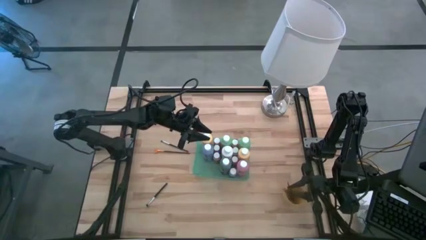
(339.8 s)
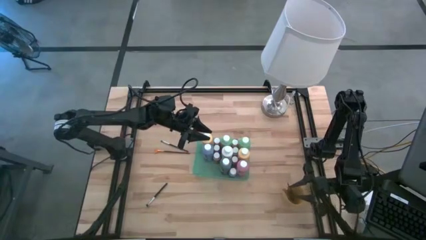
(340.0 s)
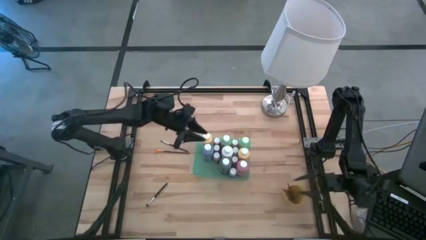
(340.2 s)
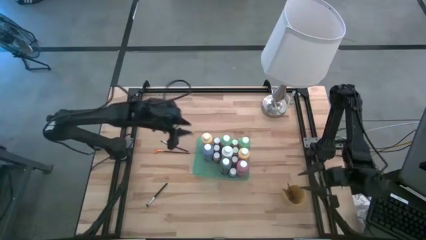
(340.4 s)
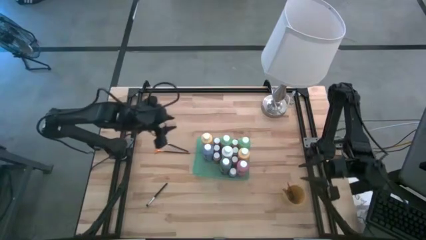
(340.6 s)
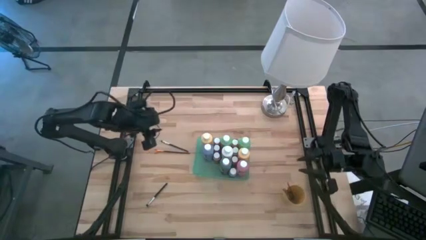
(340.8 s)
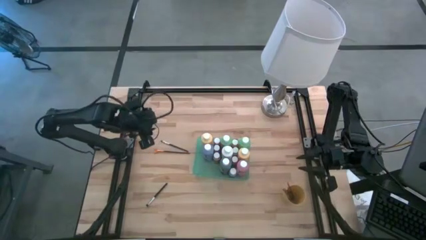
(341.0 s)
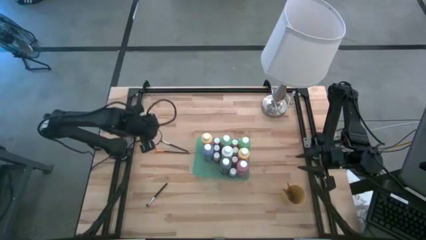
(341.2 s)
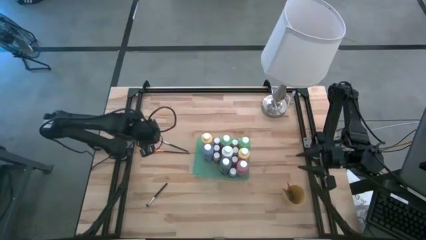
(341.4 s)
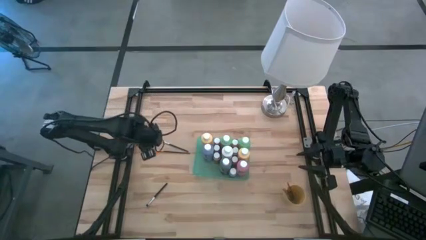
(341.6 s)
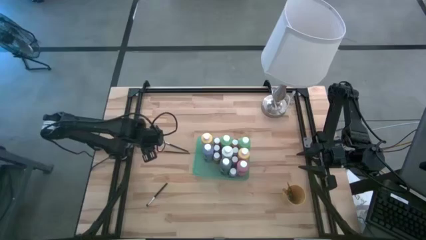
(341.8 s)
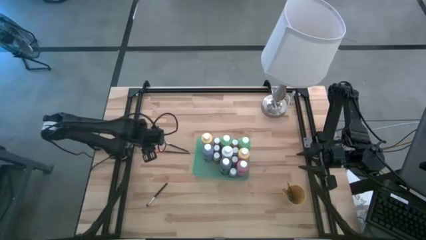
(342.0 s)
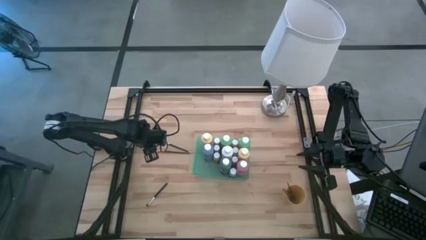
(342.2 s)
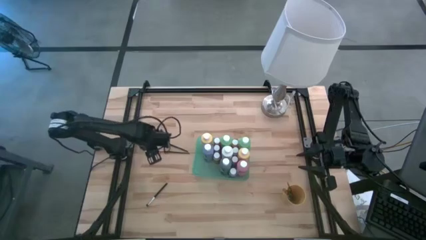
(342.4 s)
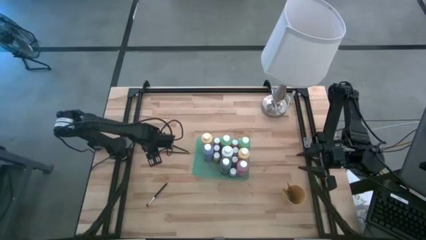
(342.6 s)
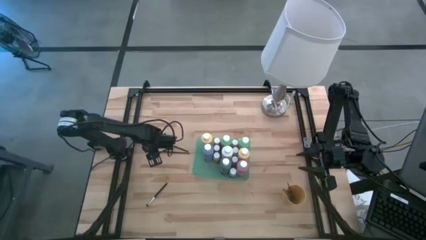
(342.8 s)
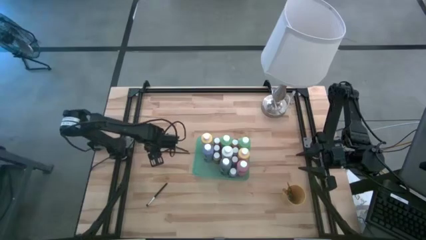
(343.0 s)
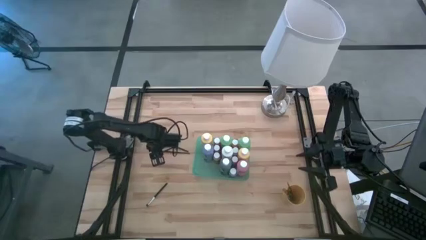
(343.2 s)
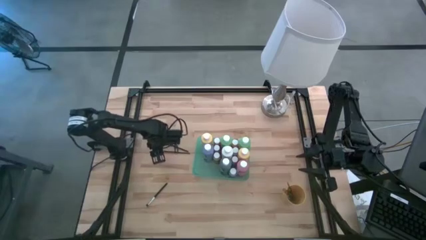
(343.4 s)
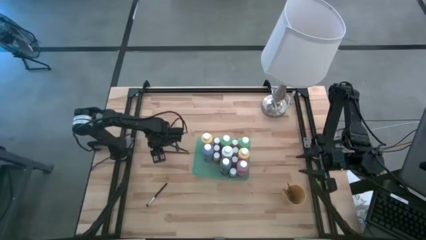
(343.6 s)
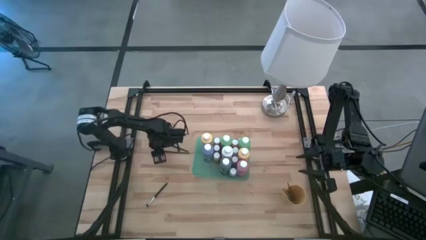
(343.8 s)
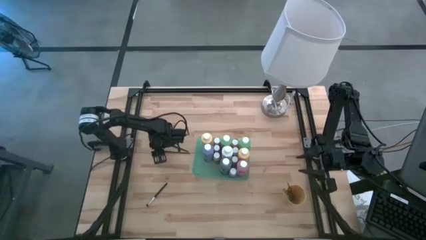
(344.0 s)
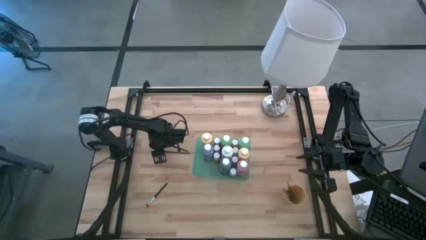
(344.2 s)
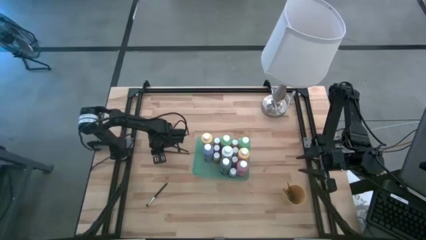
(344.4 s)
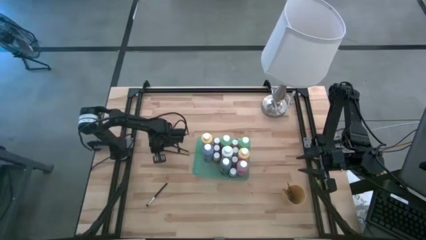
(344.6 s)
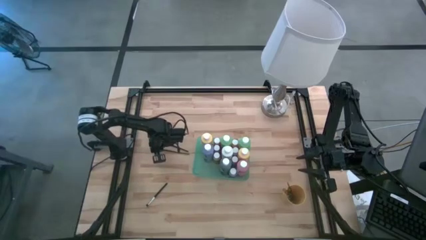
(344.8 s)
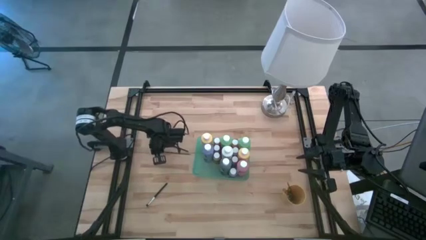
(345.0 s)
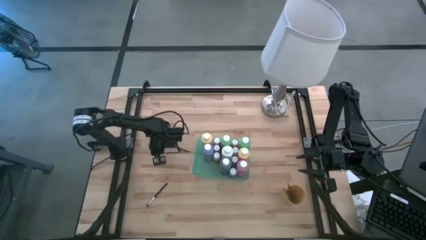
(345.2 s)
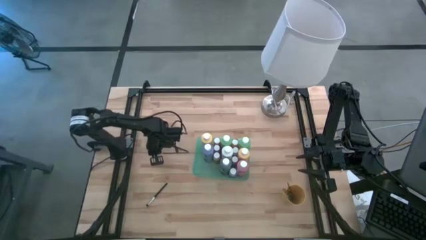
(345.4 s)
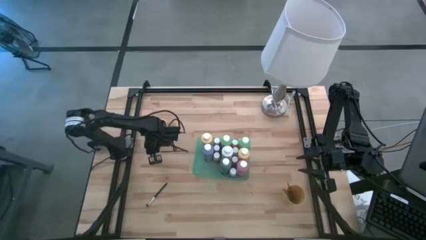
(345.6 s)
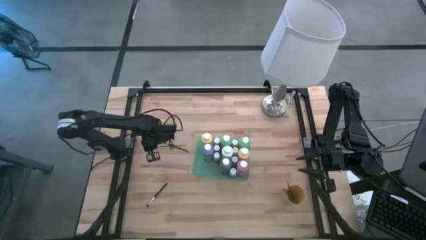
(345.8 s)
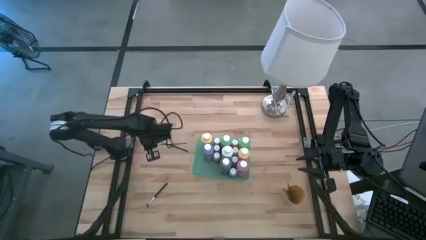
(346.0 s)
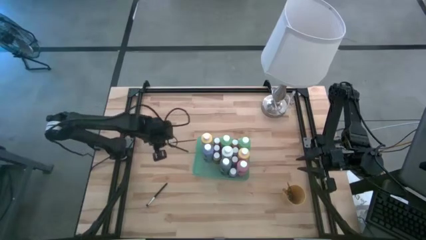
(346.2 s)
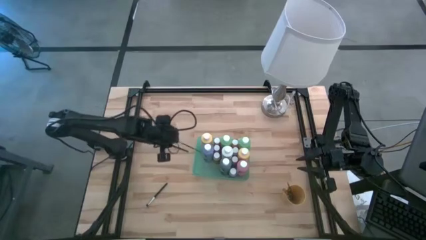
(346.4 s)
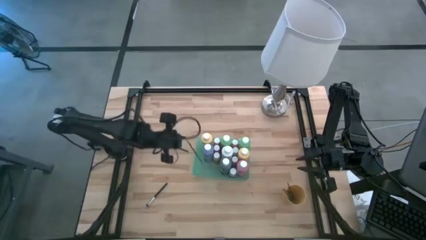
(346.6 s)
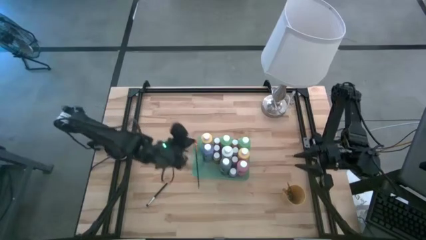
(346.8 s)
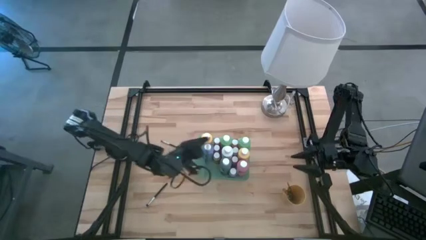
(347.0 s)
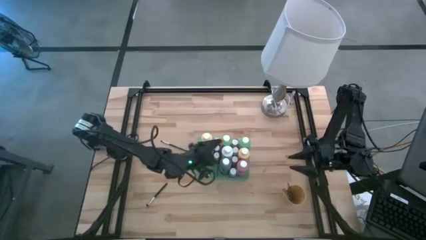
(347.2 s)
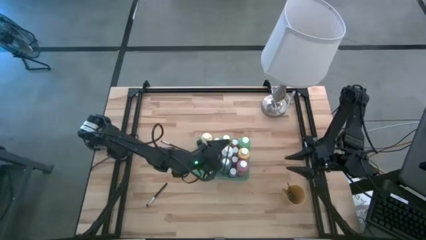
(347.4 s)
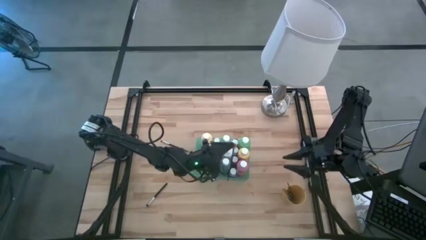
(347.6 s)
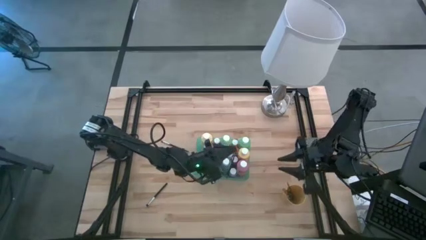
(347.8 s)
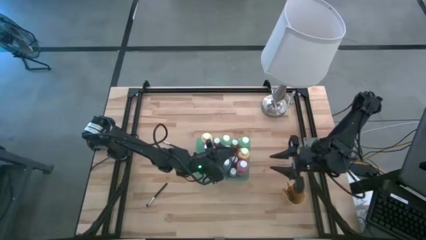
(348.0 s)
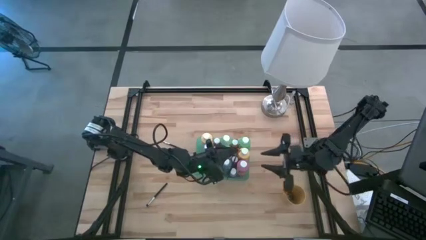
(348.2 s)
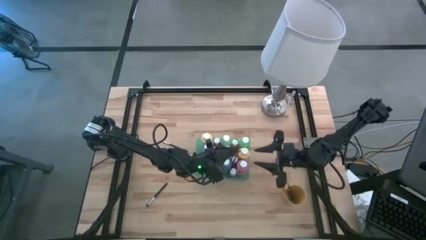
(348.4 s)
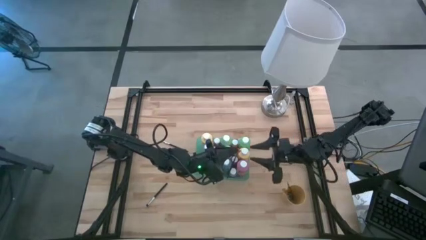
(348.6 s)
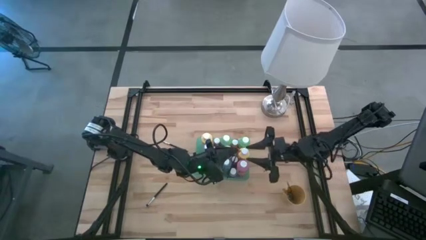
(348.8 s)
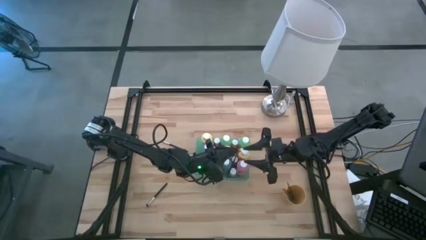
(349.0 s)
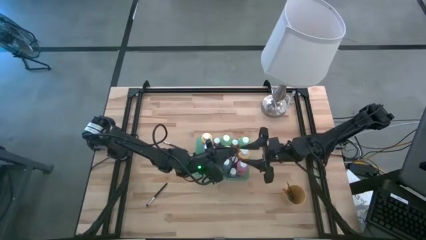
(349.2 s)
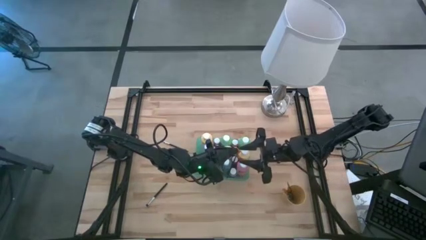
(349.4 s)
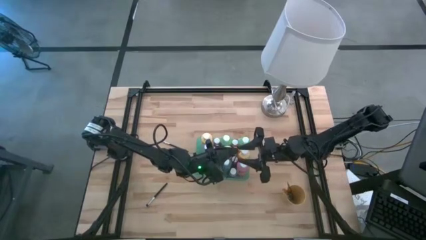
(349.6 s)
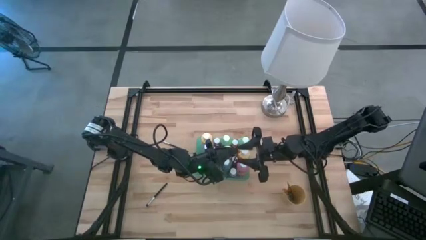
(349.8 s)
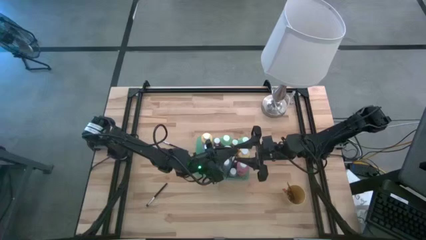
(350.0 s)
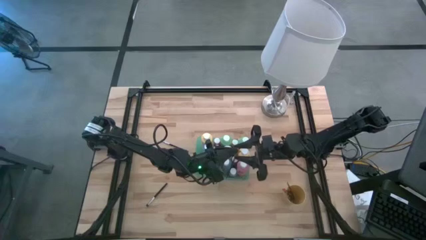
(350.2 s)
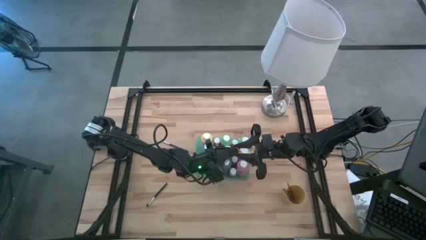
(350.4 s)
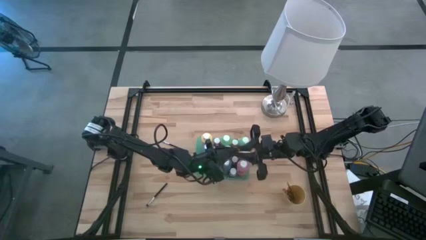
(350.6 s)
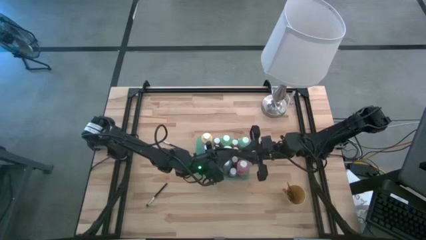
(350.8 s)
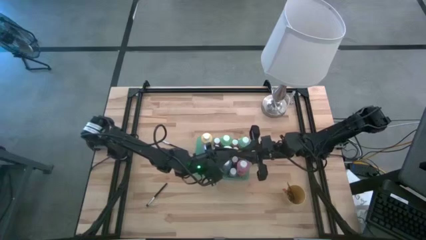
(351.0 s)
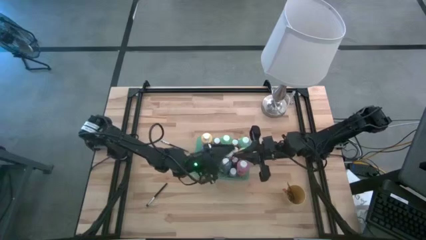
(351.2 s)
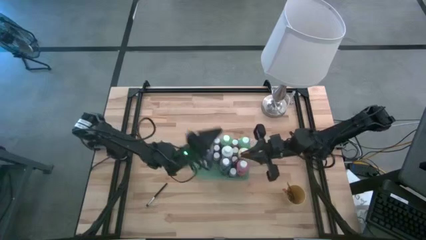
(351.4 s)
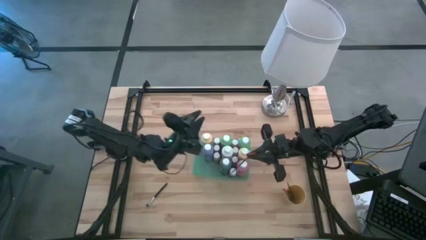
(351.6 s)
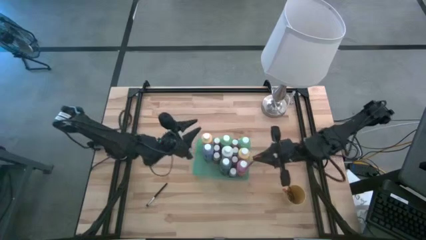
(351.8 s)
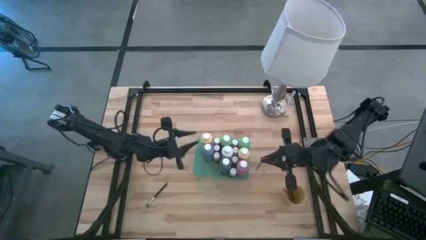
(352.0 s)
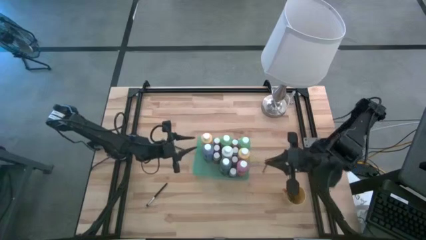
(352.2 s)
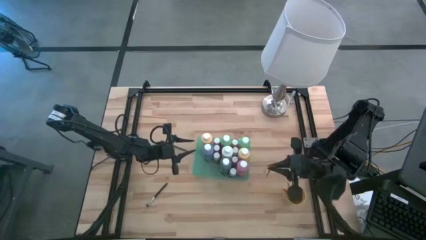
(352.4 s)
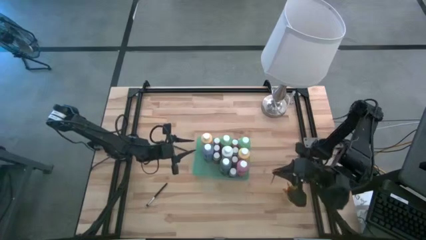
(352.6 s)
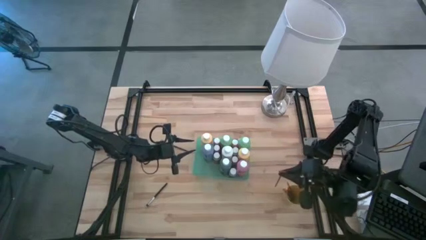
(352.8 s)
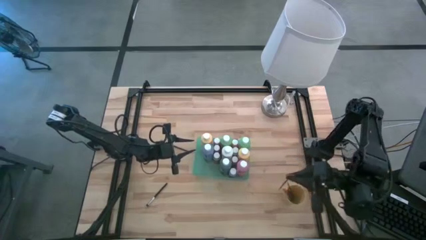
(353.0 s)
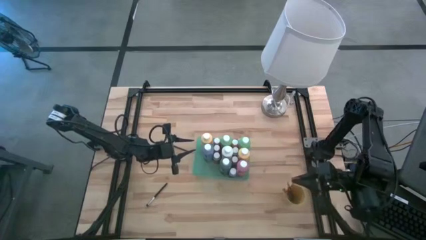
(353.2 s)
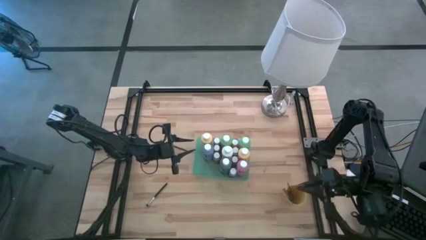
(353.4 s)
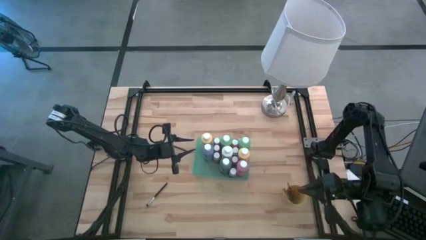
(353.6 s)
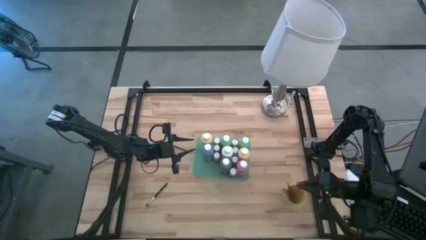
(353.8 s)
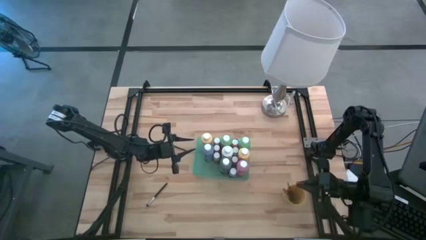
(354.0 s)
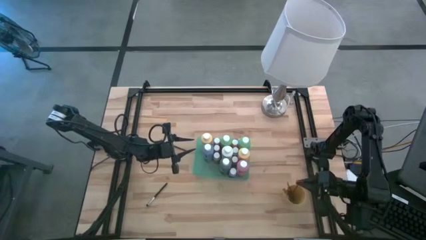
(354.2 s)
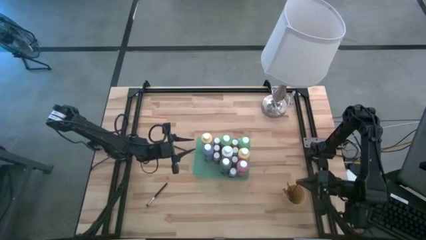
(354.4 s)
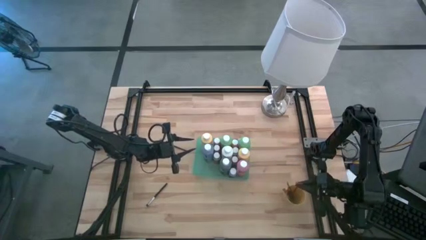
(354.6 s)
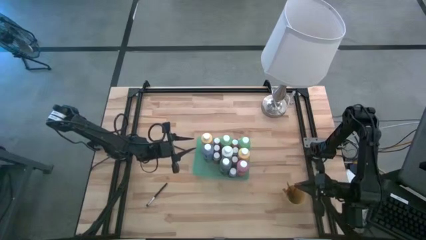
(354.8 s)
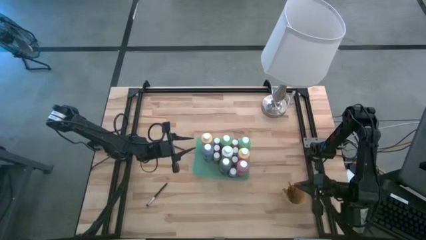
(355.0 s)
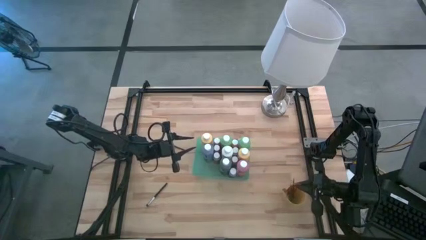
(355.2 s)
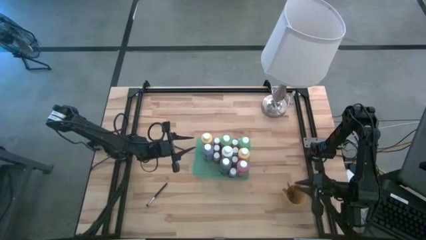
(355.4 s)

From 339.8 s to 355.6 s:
Task: Pick & Place Paint Supplies
Put the gold paintbrush into the yellow cup
